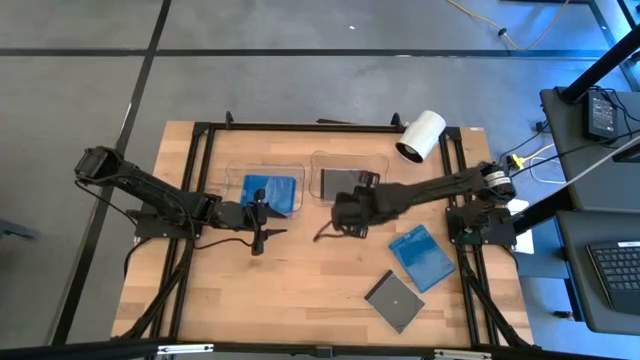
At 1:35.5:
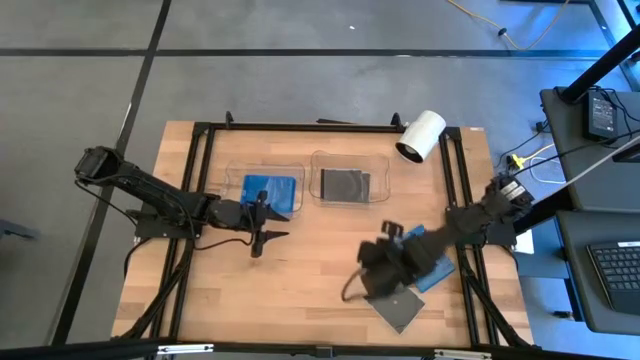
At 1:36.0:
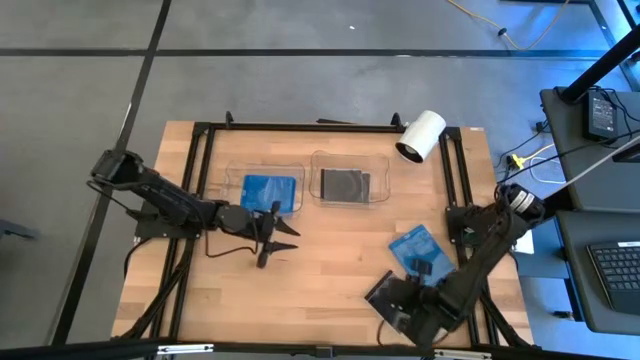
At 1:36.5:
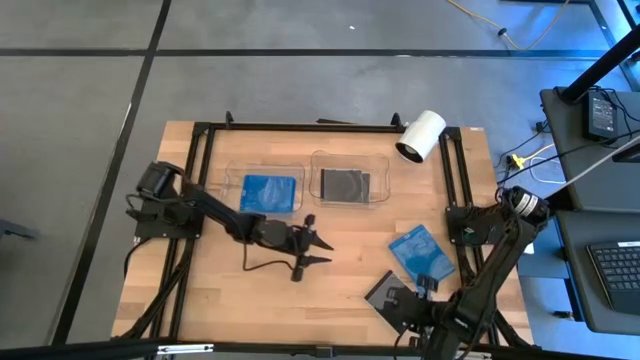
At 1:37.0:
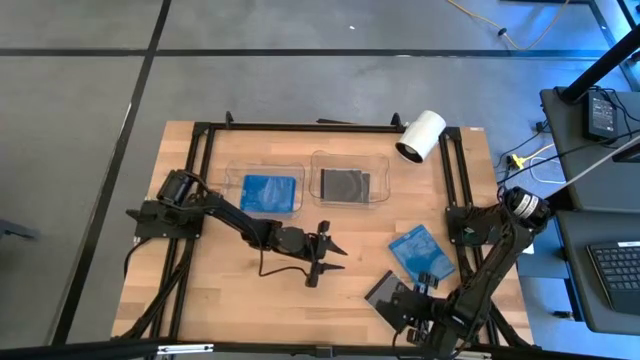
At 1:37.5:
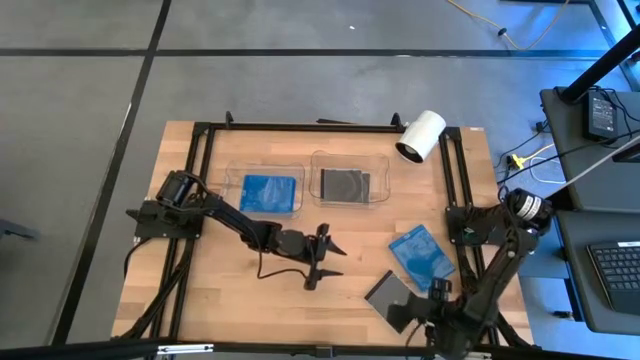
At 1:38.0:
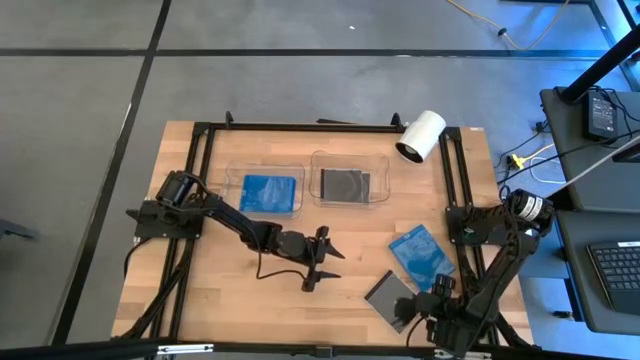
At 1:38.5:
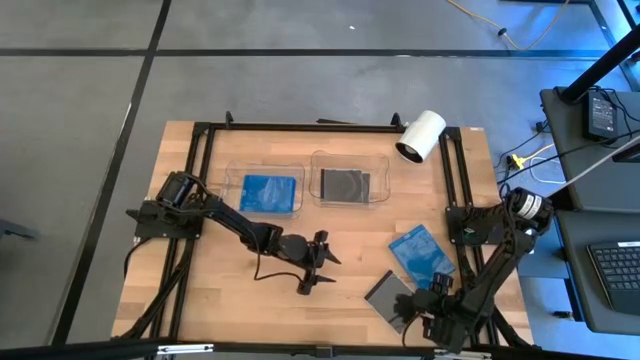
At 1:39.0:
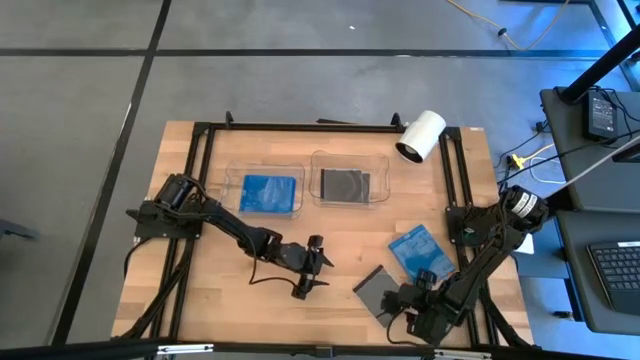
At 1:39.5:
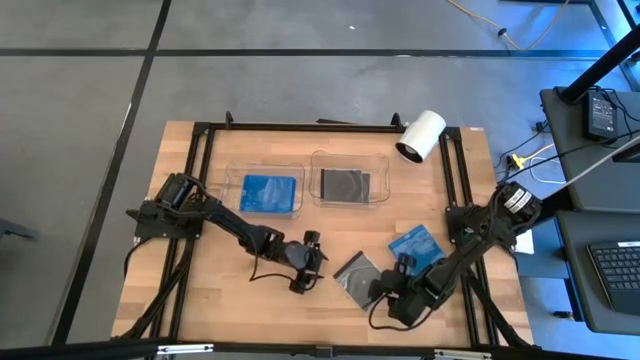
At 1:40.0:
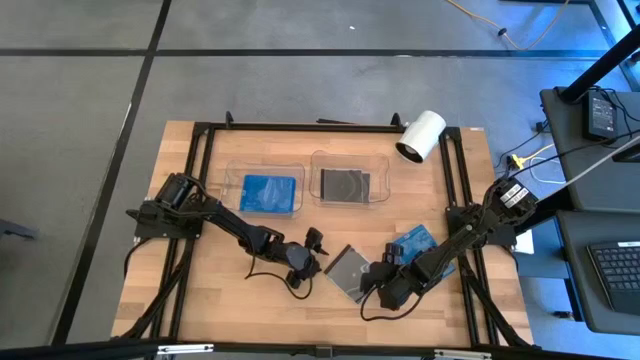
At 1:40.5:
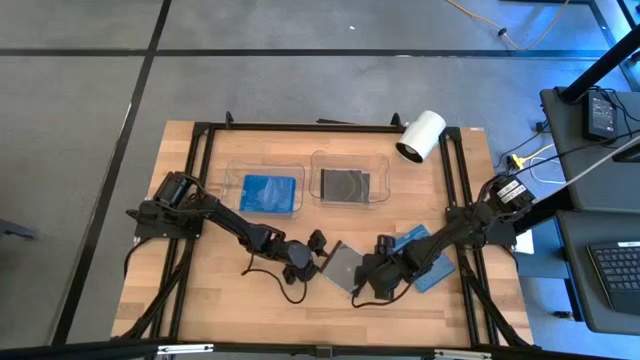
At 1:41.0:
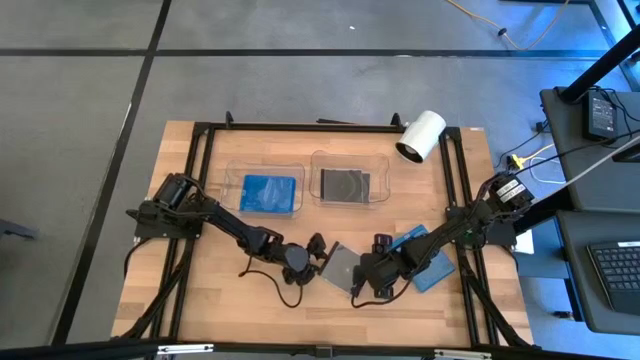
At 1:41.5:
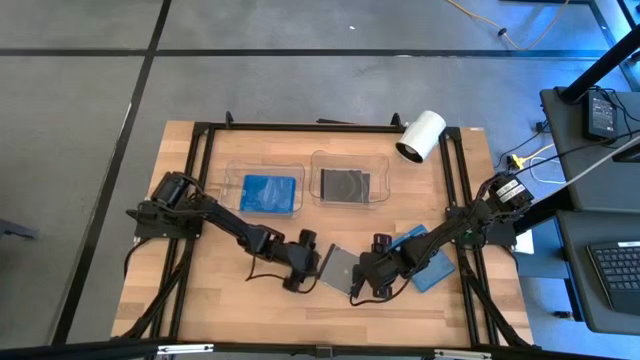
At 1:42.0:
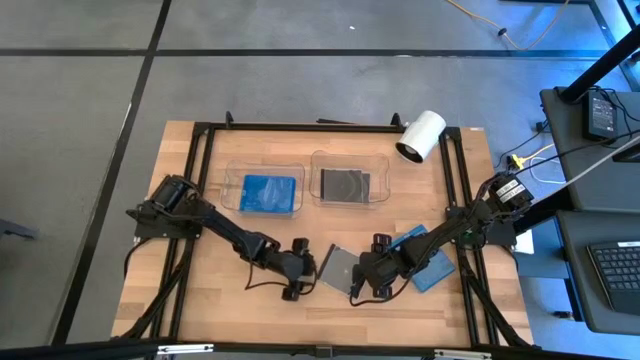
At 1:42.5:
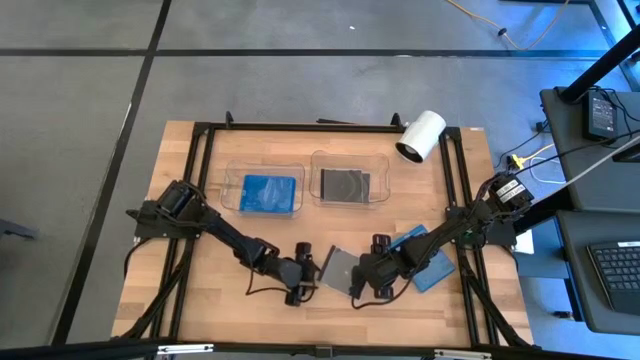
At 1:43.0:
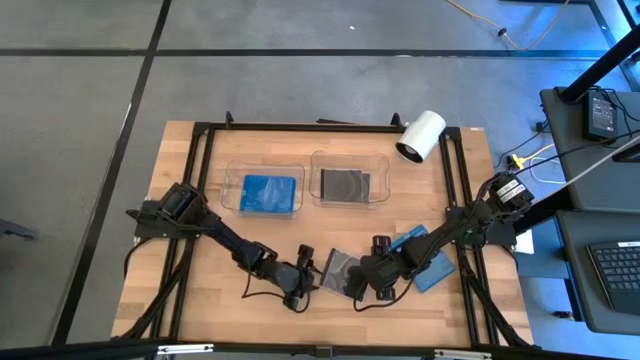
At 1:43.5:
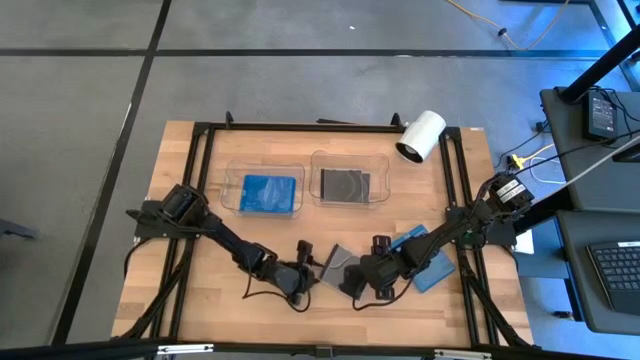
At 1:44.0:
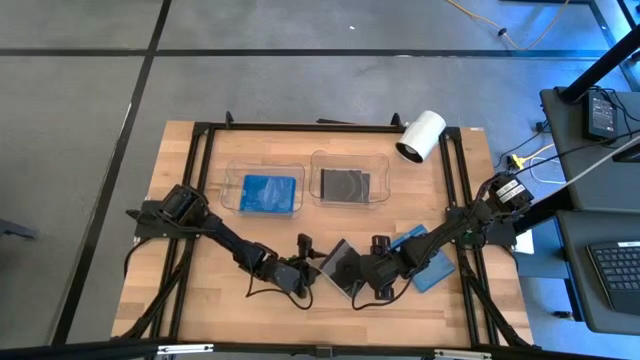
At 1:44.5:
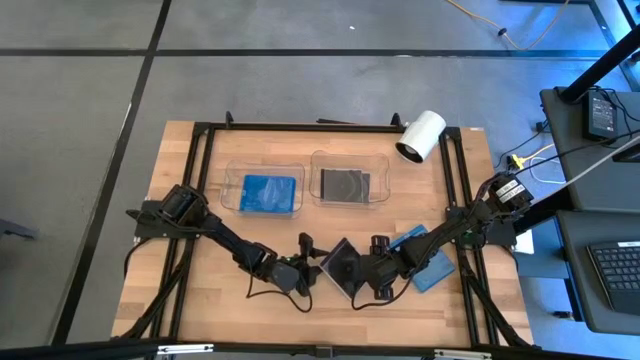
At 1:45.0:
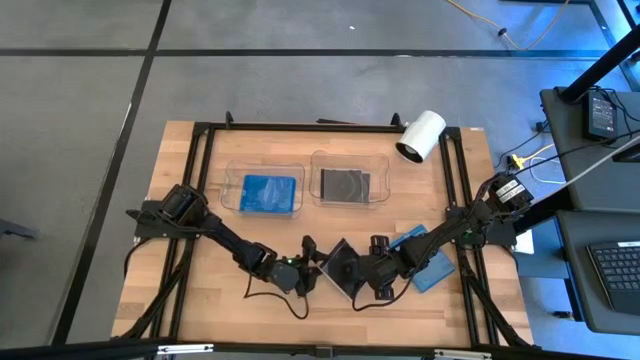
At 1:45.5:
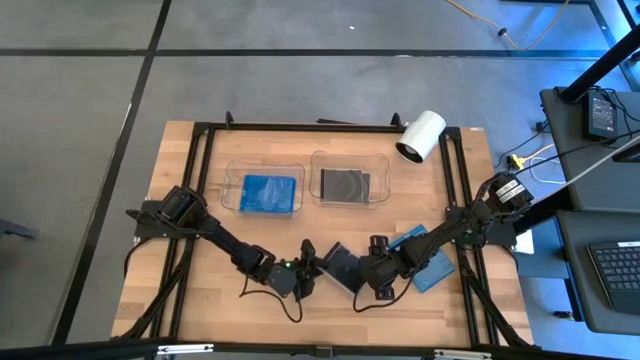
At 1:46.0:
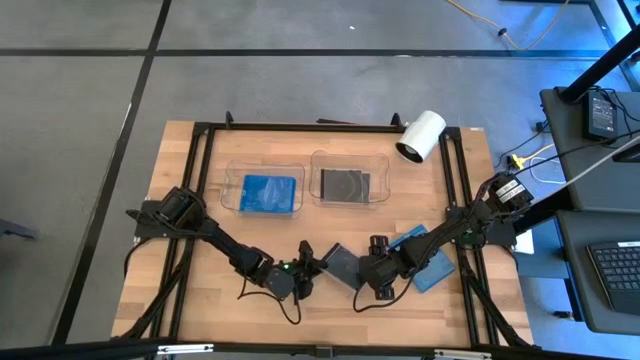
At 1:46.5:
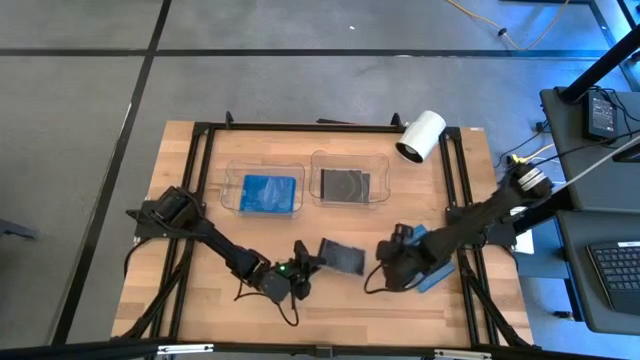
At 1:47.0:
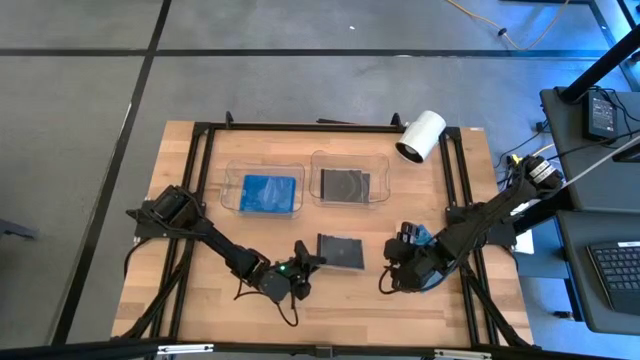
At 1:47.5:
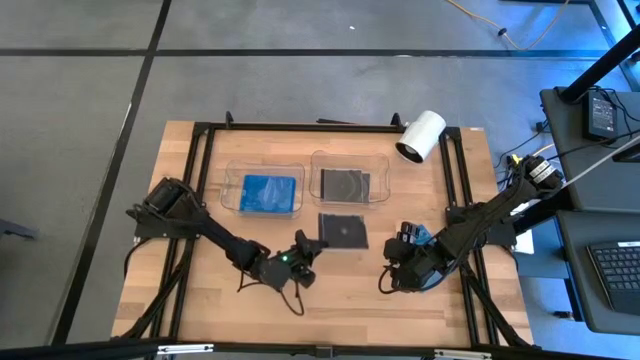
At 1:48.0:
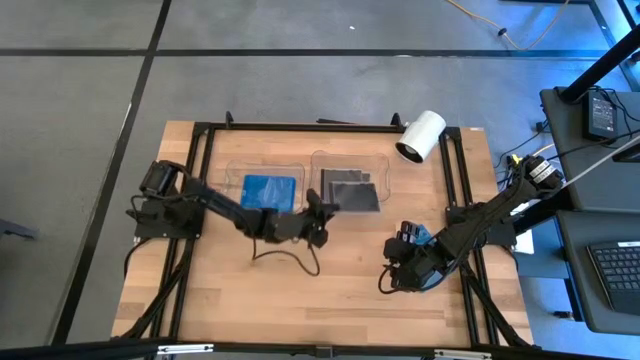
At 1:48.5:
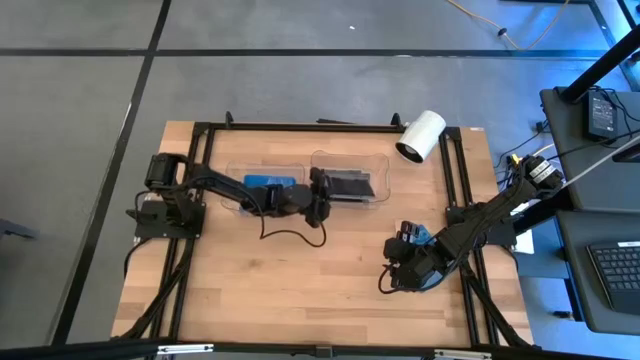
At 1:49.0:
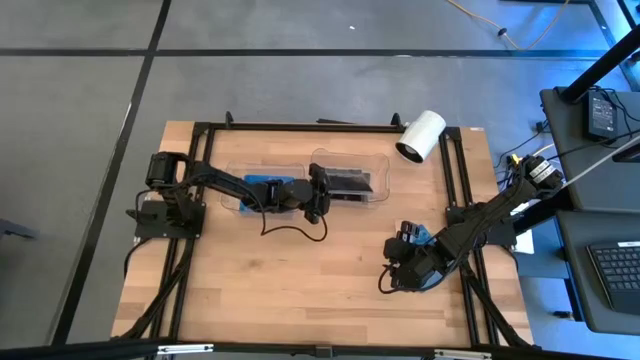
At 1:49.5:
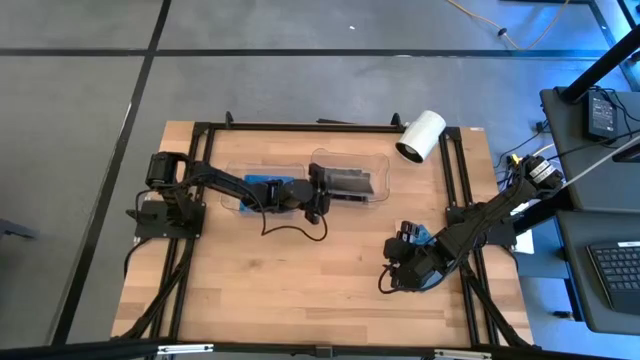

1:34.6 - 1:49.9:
Task: Pick & place jewel cases by type
Put the black CD case into the right transparent bin

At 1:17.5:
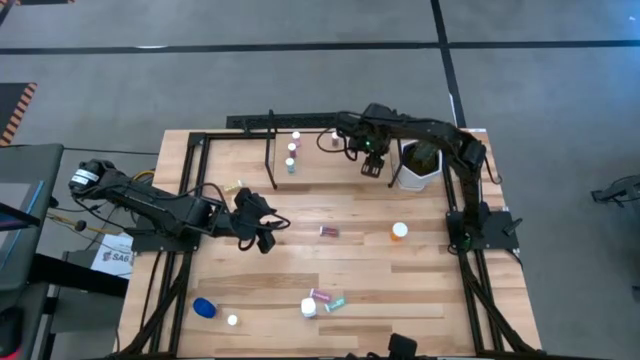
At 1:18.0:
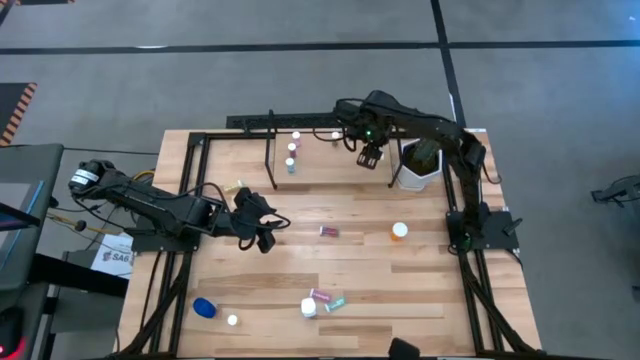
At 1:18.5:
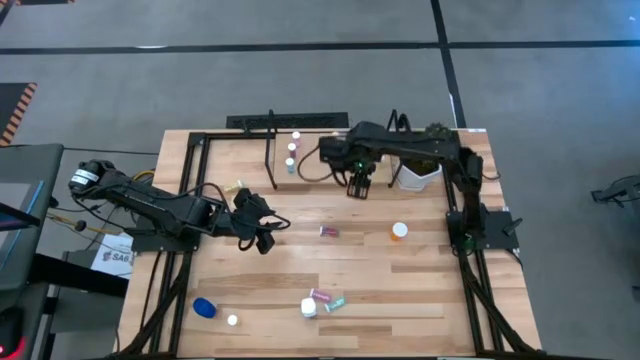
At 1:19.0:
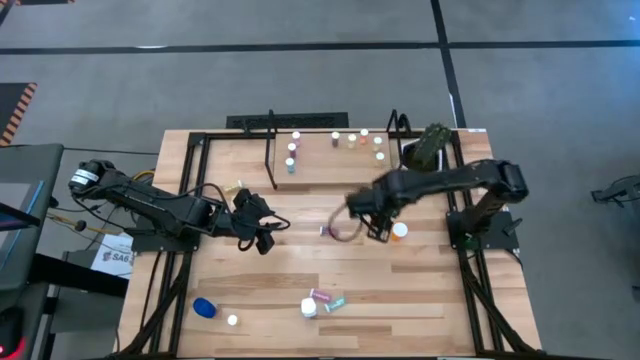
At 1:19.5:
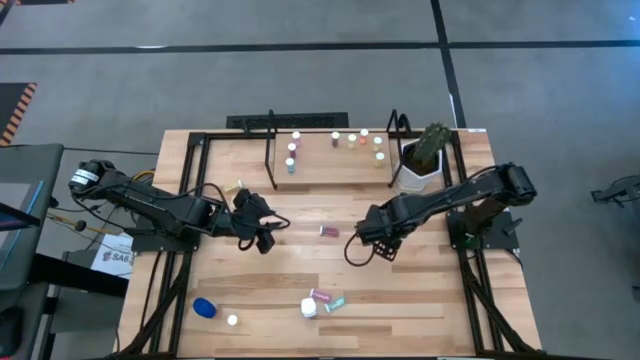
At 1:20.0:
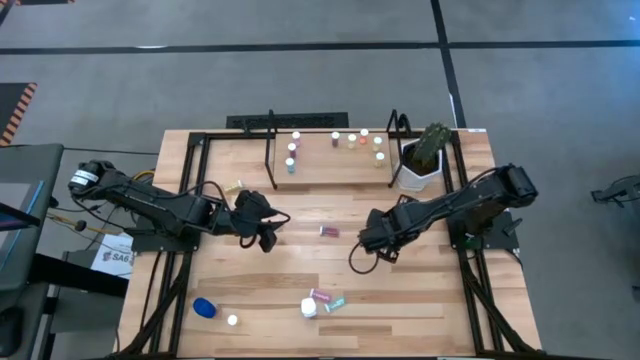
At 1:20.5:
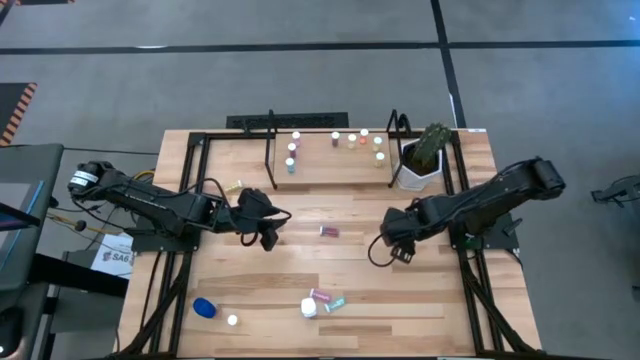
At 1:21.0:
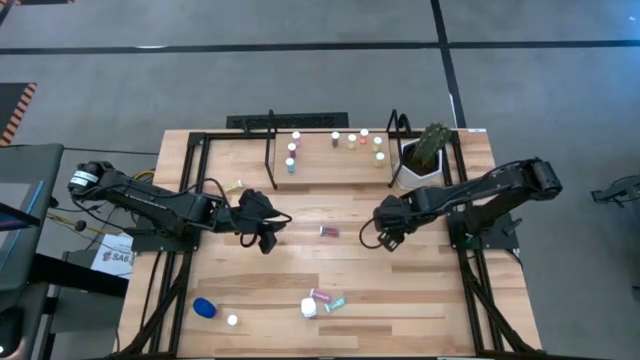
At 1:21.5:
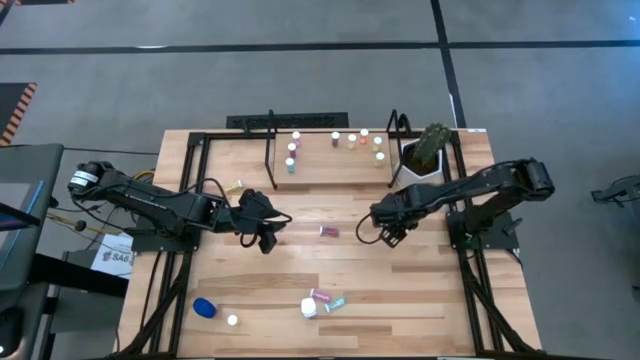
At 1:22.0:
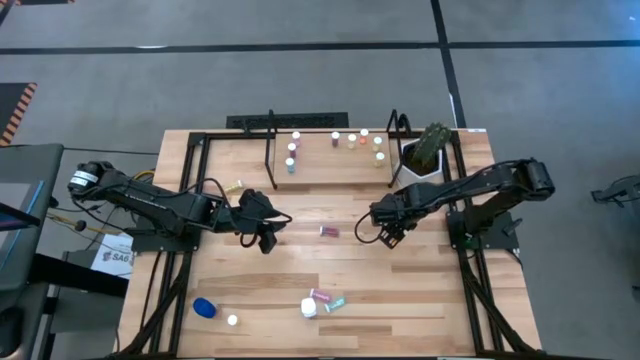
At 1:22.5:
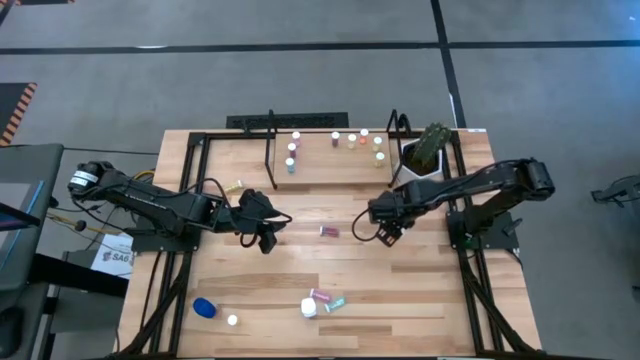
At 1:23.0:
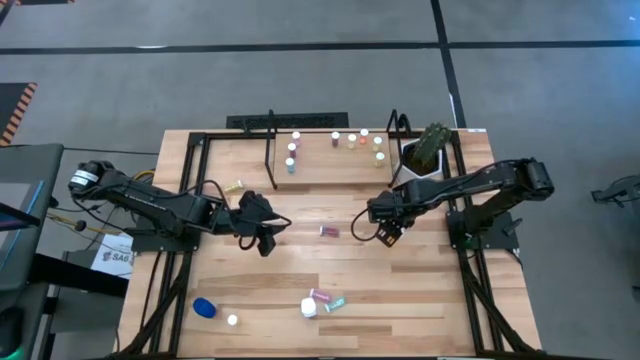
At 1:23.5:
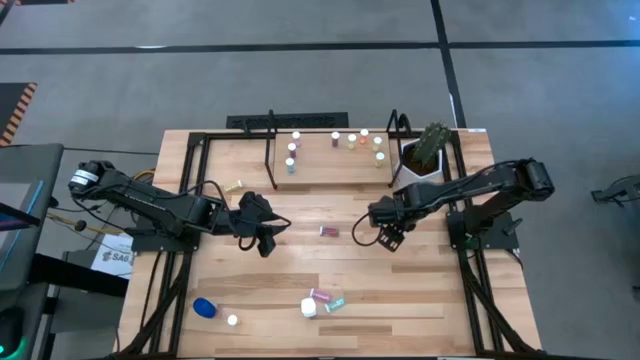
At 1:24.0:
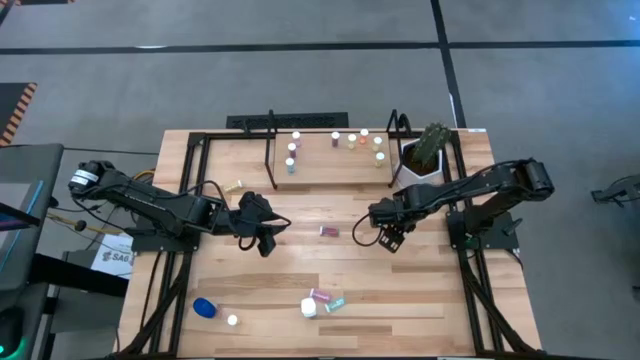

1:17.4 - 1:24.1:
Task: Pick and place medicine bottles onto shelf by color
Put the orange pill bottle on the shelf
